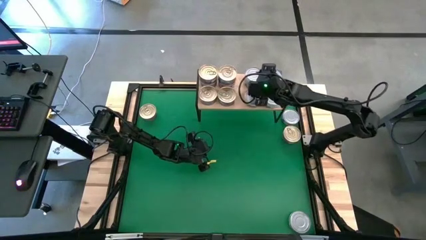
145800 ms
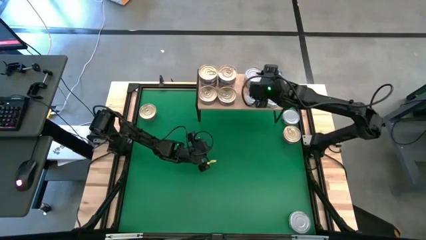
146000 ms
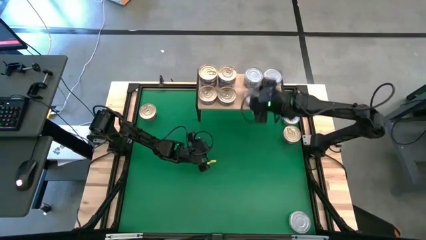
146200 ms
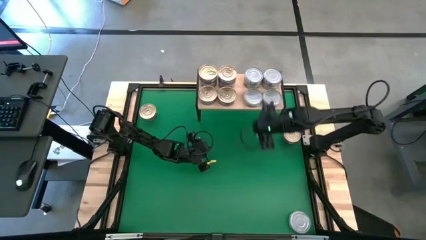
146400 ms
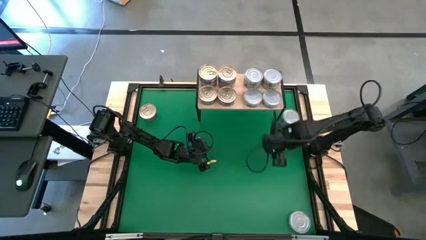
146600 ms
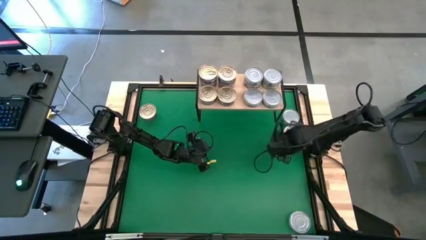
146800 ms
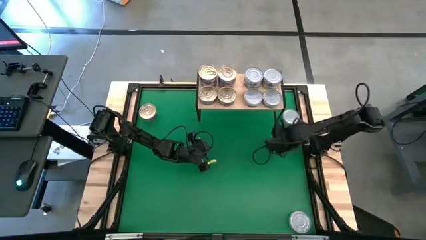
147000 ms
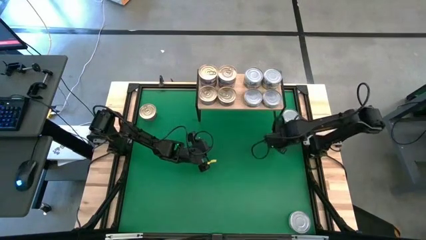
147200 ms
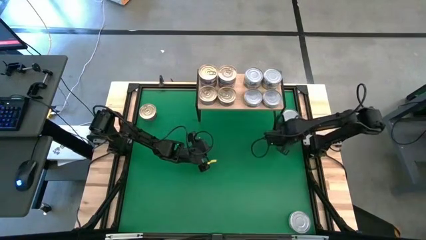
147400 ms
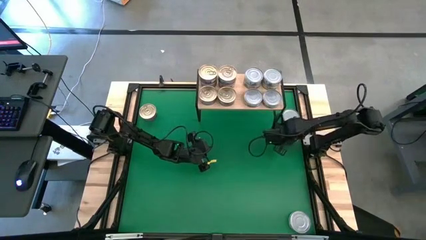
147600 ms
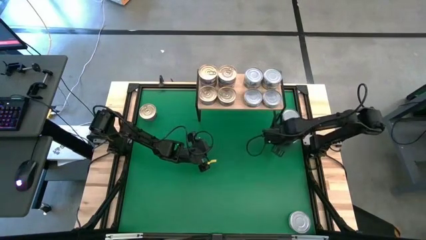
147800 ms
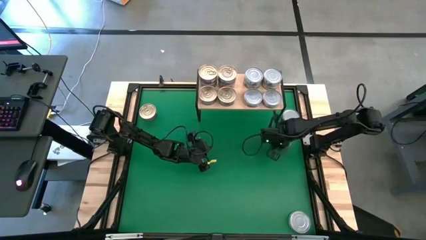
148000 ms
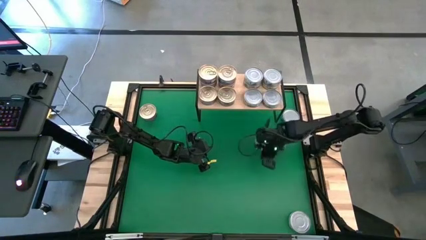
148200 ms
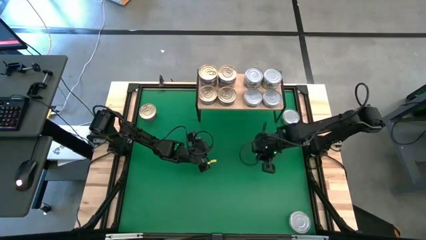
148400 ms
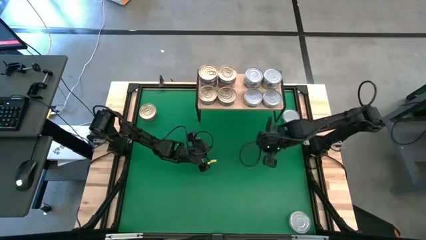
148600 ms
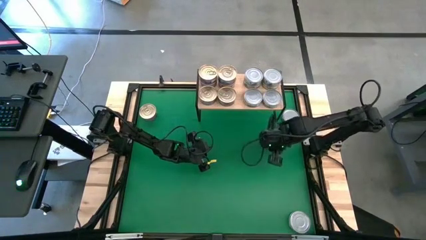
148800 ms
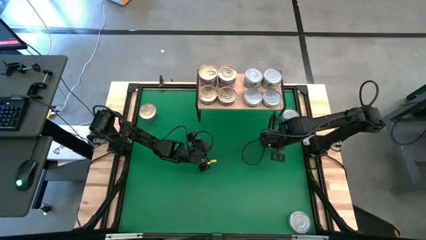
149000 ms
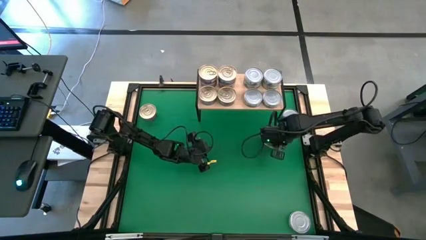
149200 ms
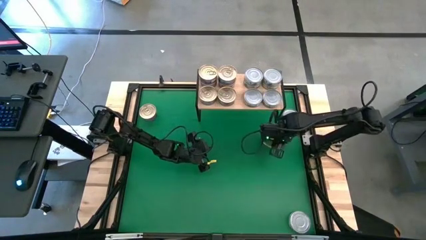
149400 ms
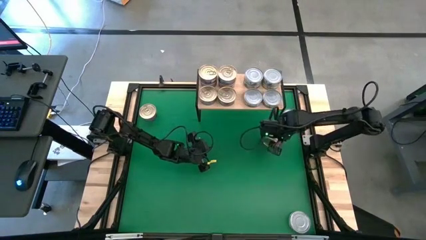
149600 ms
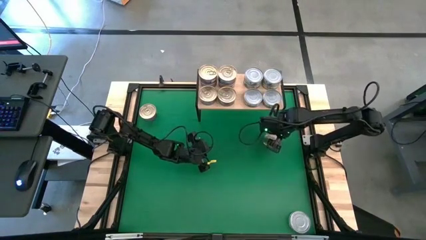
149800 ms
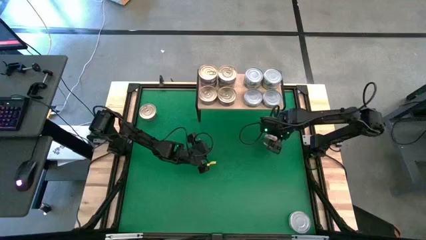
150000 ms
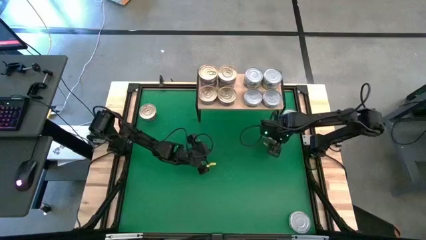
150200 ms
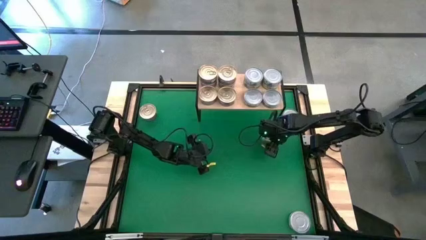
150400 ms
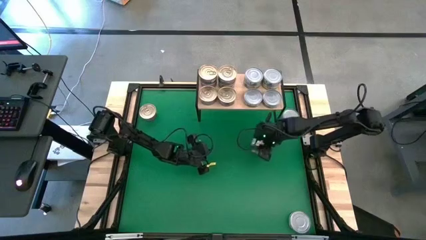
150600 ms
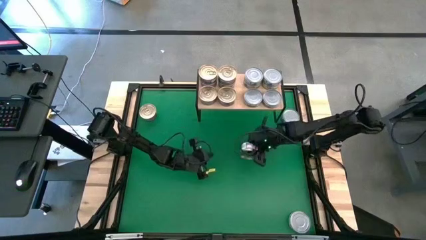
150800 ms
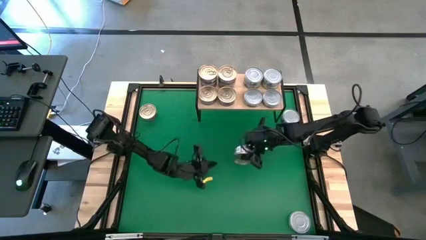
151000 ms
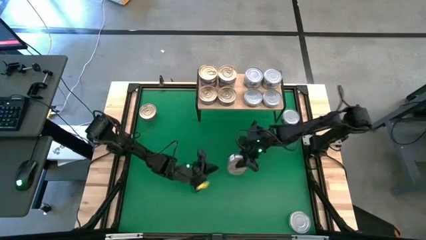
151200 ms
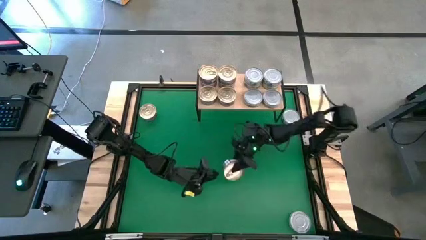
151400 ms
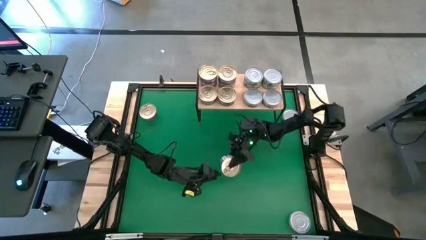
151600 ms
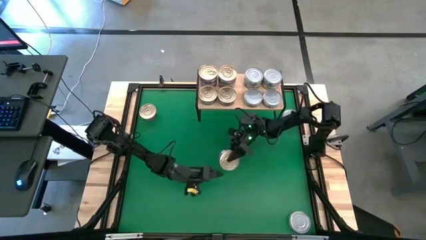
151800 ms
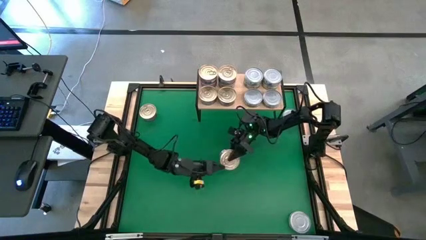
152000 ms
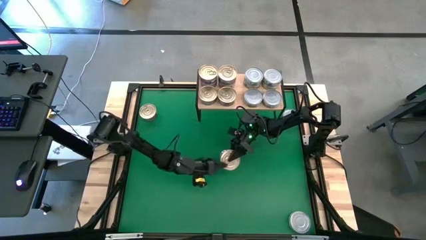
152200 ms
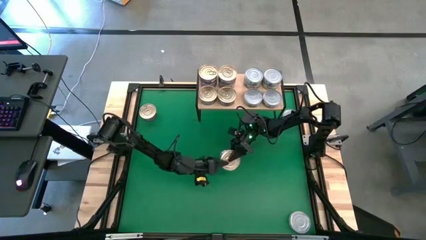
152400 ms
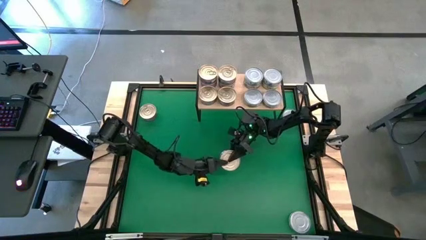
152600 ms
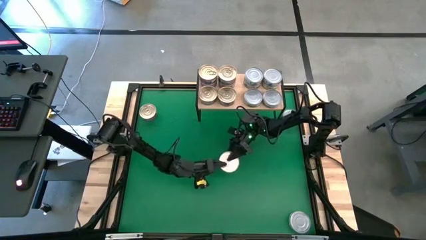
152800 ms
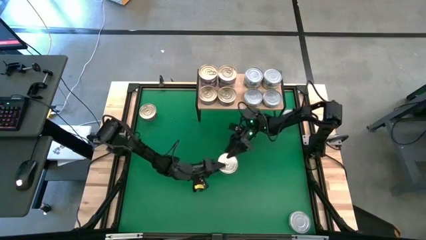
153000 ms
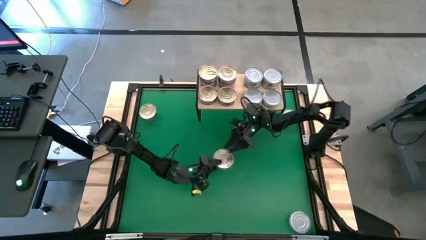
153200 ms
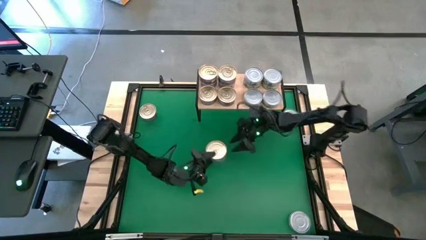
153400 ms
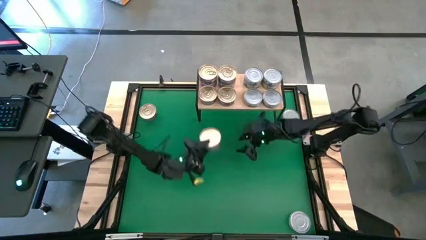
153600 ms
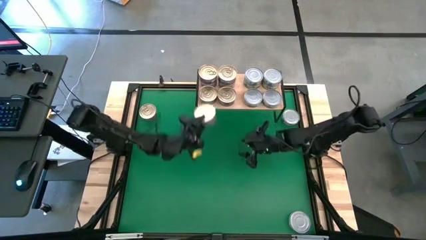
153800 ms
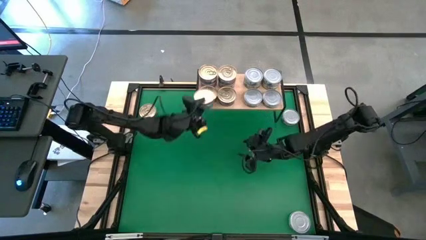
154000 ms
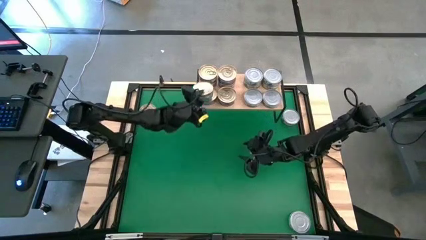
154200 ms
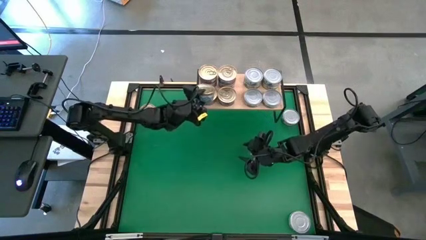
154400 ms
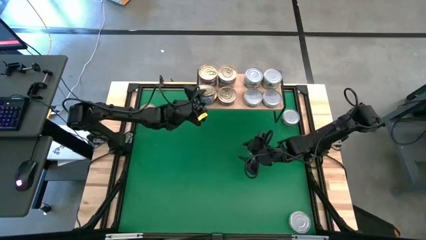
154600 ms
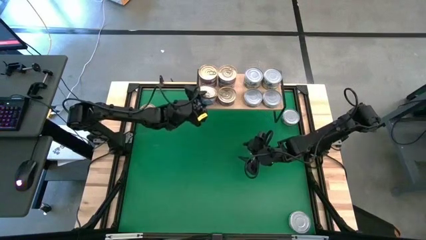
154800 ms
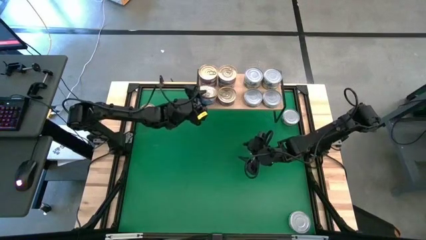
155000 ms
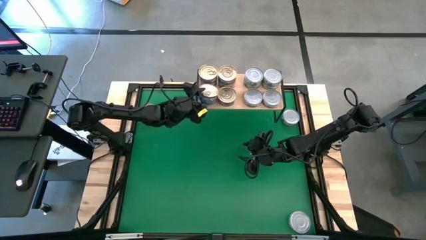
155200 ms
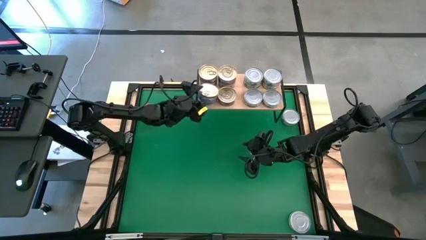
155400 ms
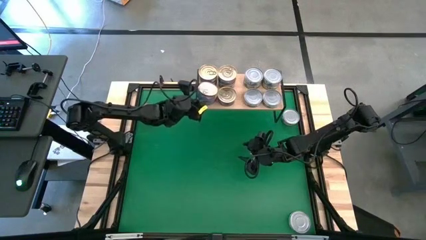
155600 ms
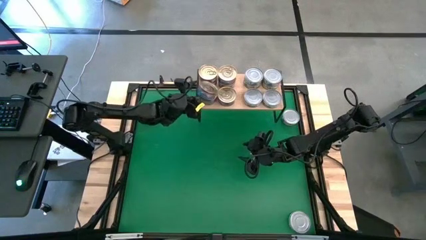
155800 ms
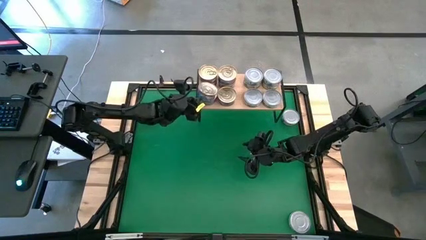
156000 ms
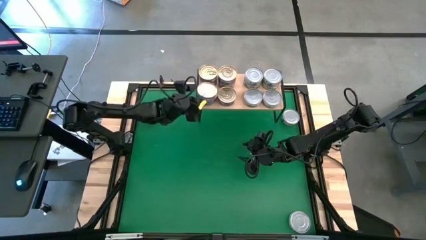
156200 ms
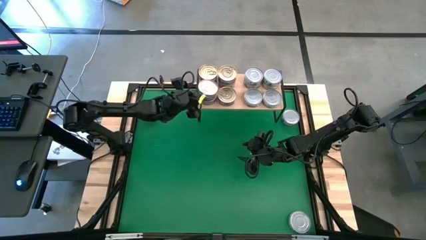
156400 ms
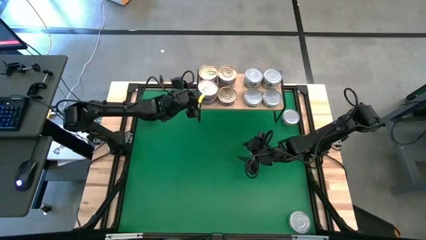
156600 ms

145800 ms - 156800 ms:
Task: Stack canned seafood by type on shelf
Stack the blue pink tuna can on top of the blue pink tuna can on the shelf

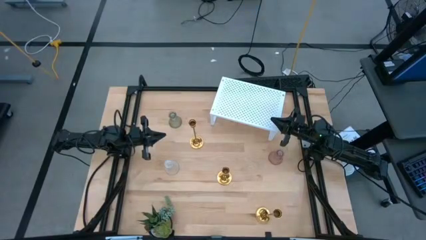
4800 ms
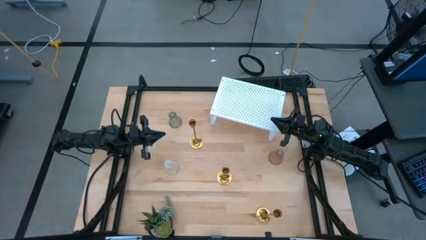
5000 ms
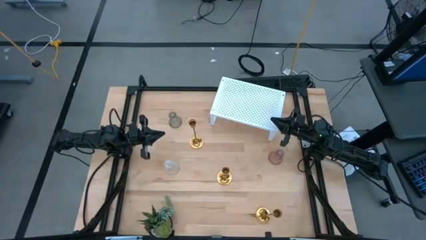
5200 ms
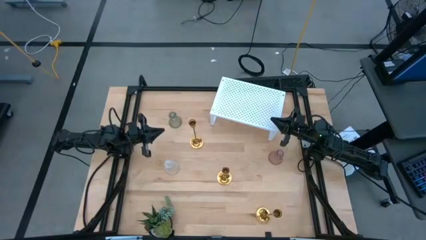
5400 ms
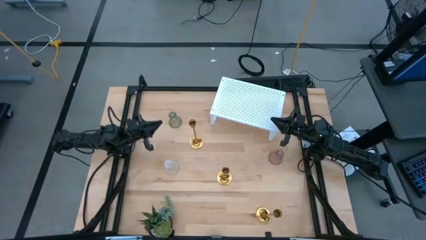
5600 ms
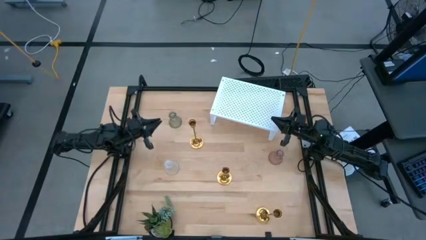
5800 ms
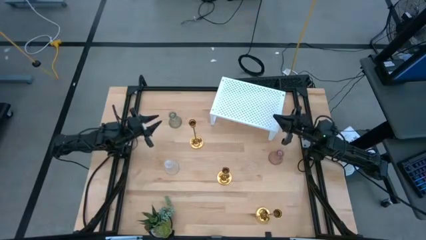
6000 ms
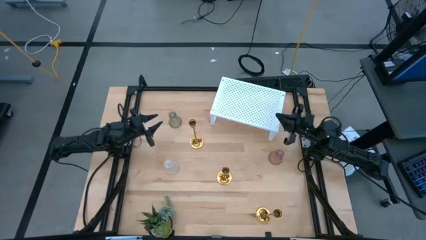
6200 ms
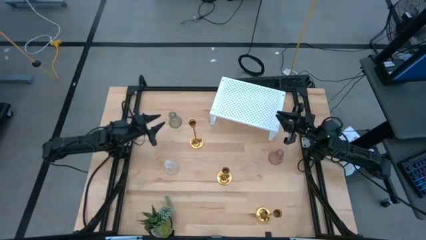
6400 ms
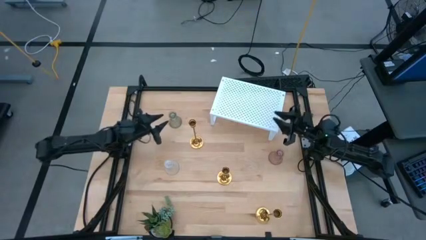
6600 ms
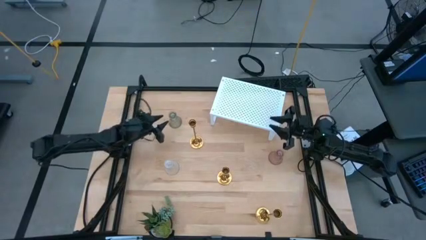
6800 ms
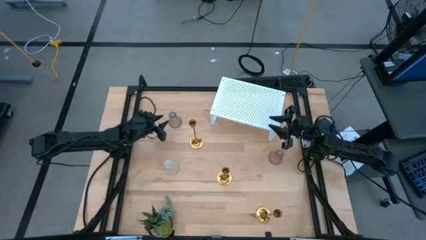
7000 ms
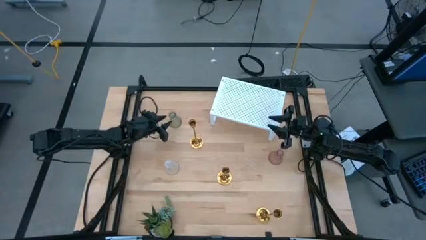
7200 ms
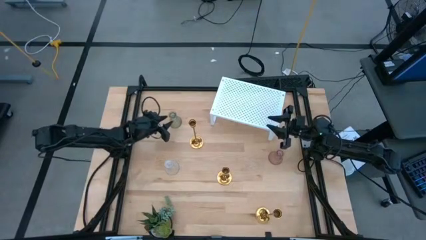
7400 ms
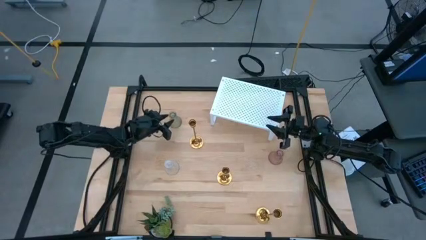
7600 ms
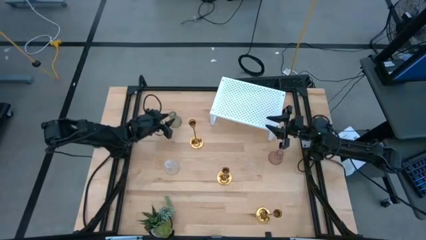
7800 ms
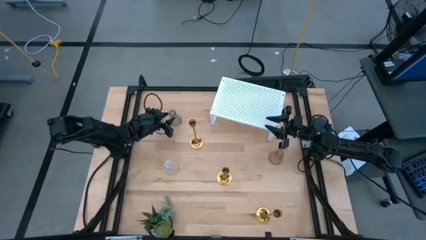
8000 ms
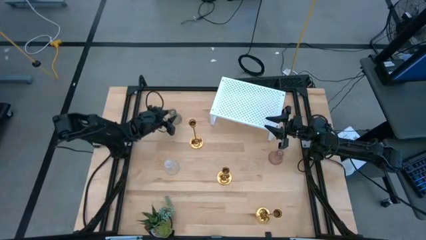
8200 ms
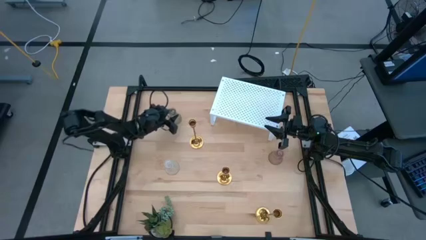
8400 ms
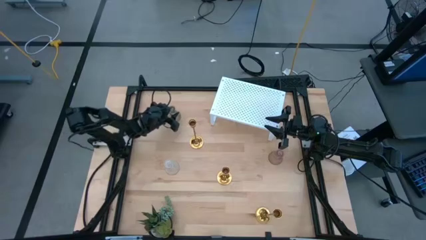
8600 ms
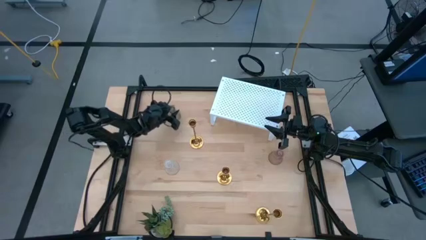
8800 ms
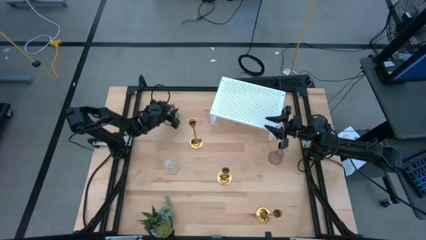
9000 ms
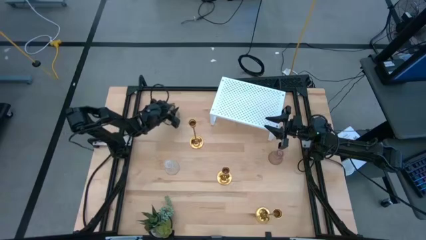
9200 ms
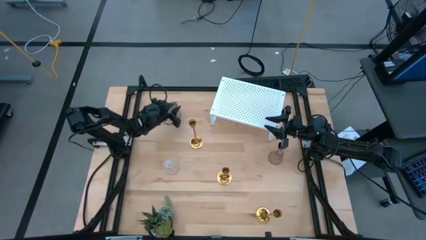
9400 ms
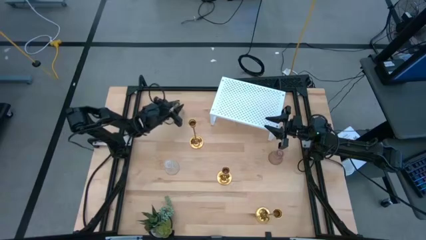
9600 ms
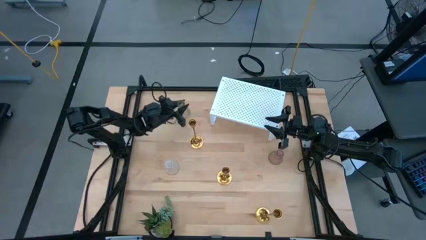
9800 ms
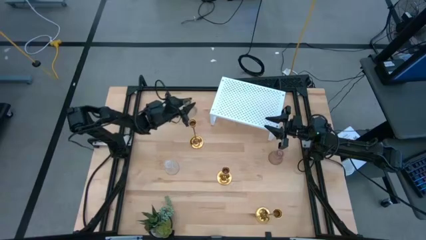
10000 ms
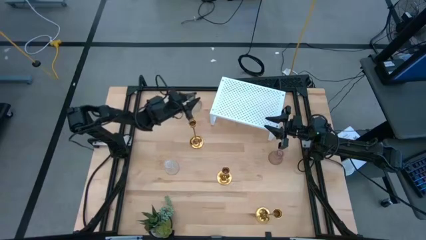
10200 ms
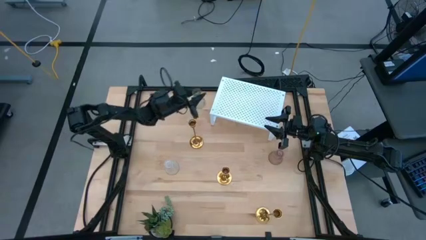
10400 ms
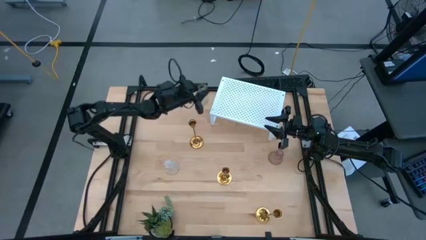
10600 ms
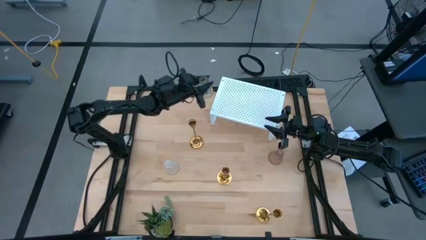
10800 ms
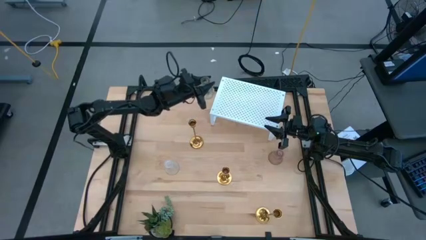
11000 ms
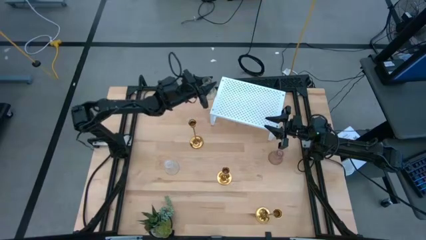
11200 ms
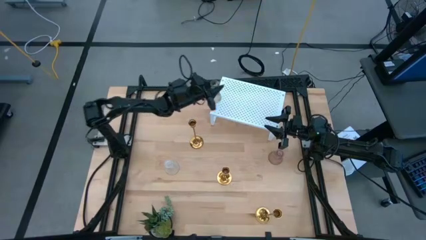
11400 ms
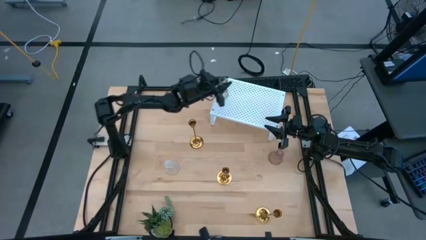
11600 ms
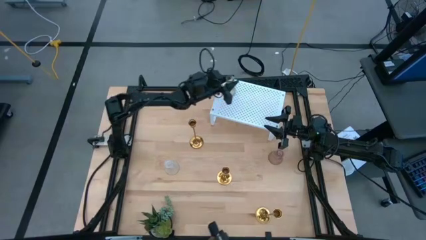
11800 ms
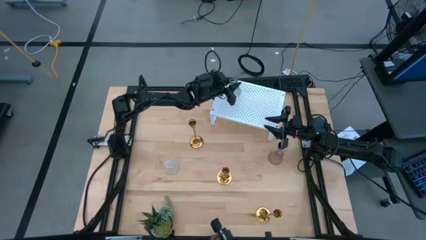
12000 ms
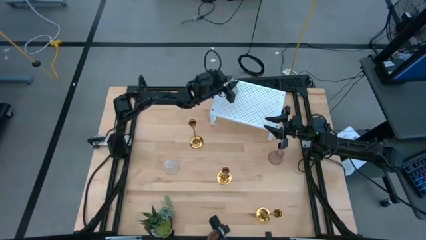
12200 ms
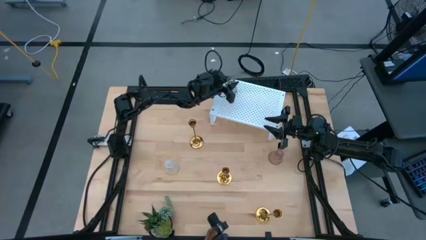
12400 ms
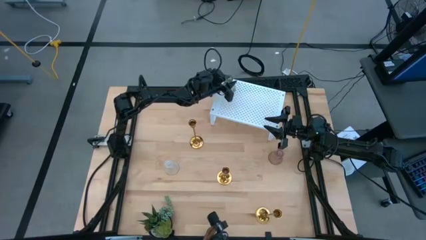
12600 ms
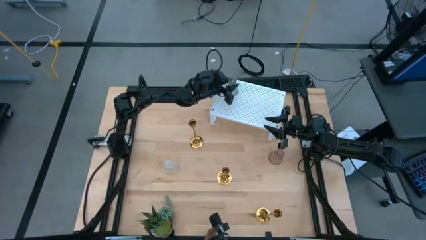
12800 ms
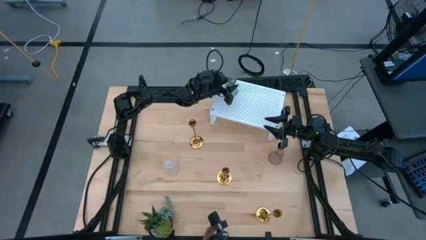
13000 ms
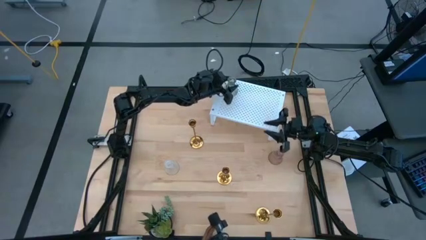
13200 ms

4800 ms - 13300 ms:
Task: Pick & Place candle stick holders
Put the green glass candle holder on the shelf
